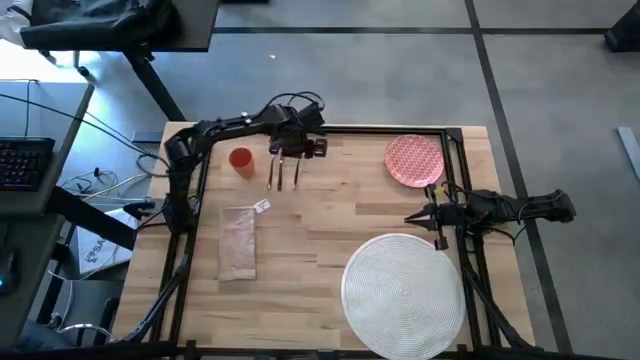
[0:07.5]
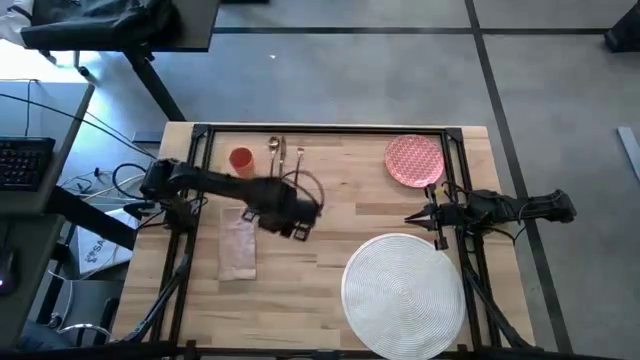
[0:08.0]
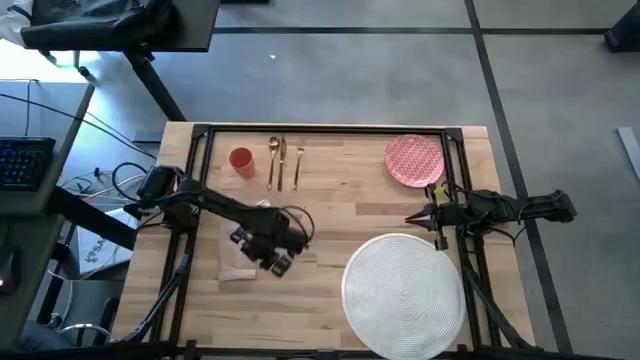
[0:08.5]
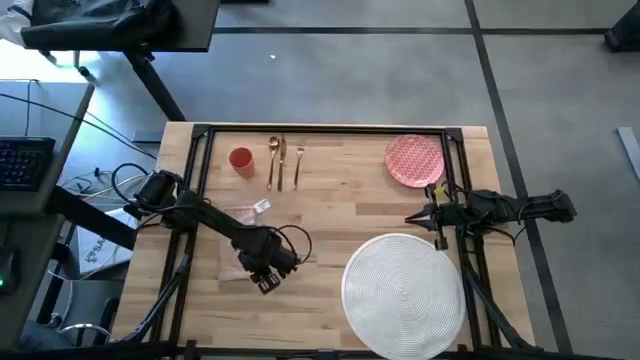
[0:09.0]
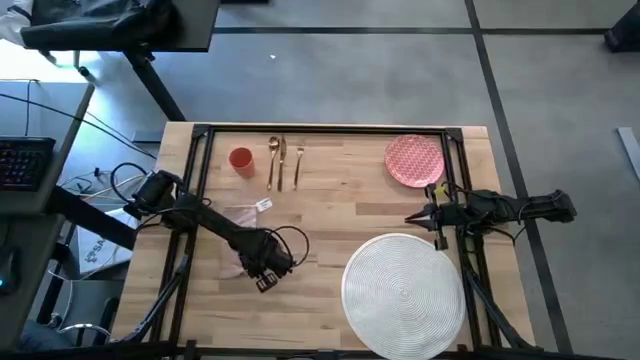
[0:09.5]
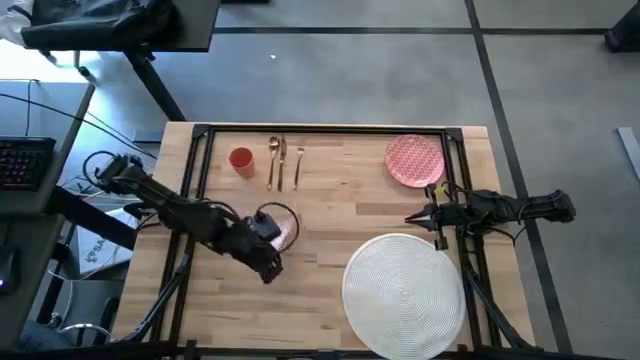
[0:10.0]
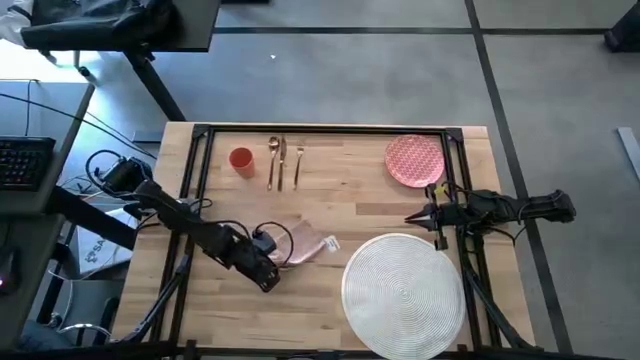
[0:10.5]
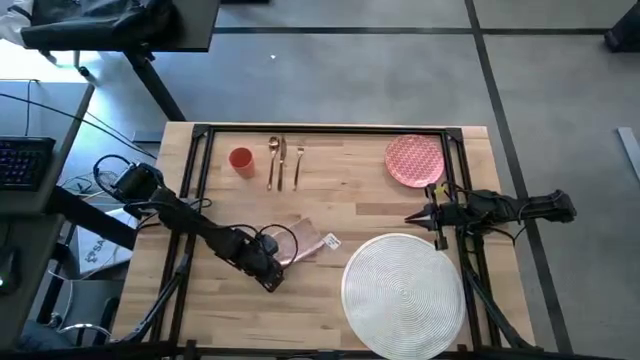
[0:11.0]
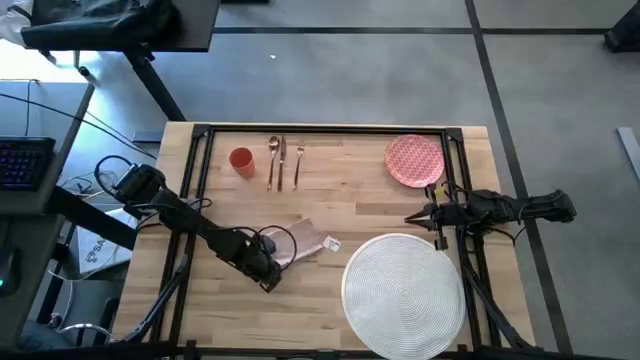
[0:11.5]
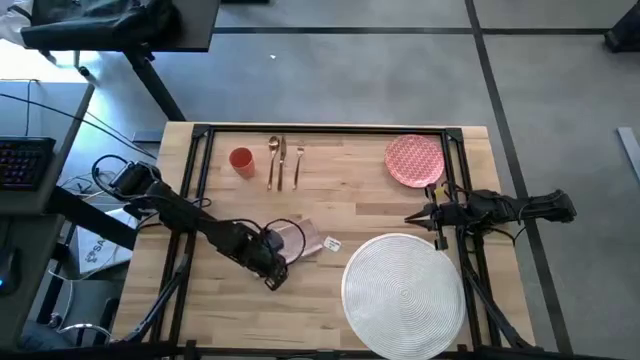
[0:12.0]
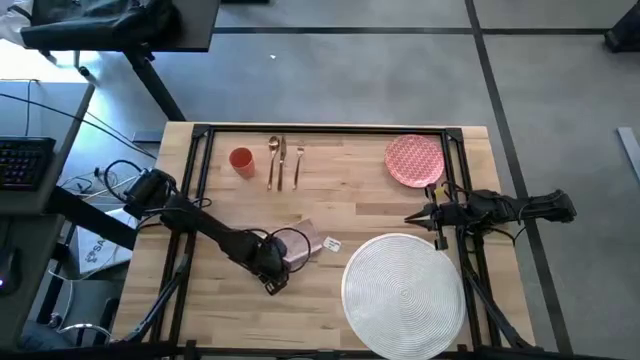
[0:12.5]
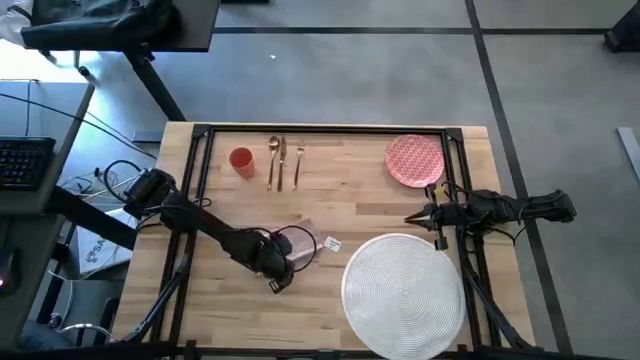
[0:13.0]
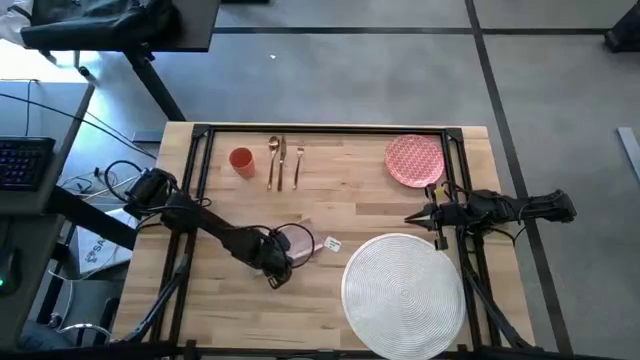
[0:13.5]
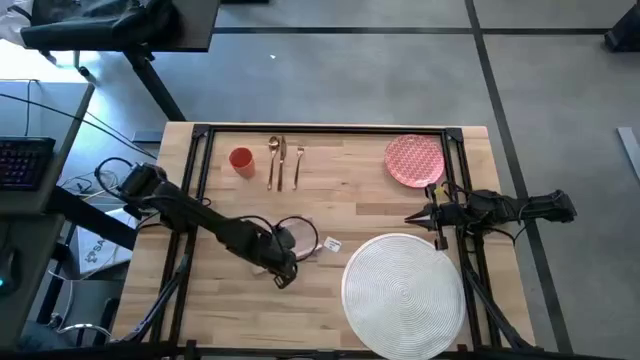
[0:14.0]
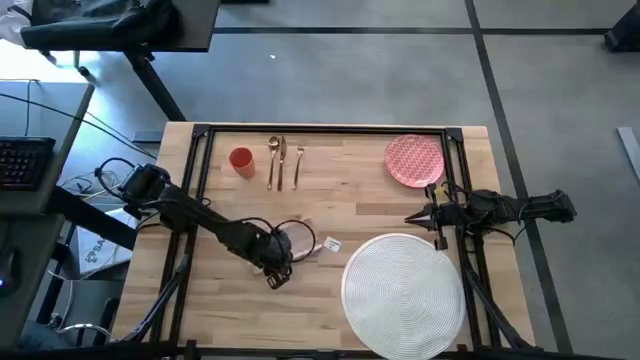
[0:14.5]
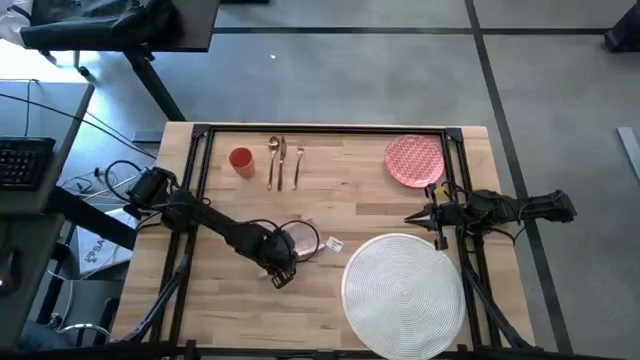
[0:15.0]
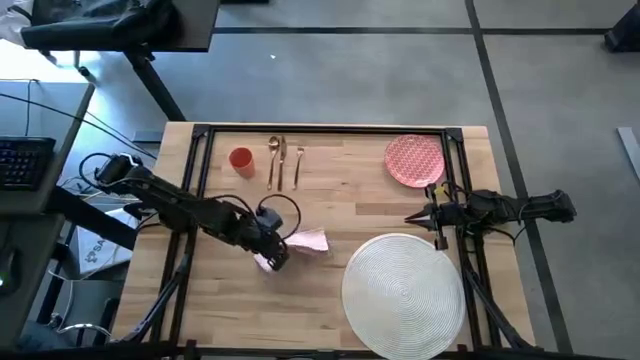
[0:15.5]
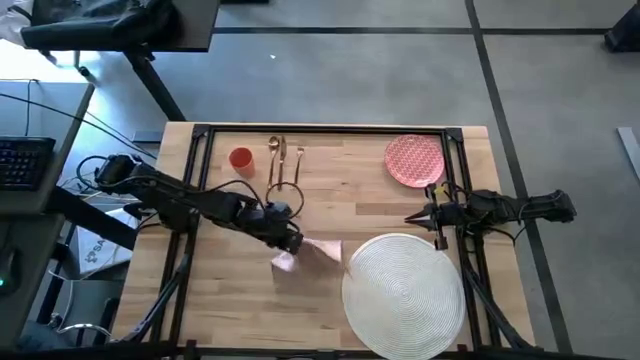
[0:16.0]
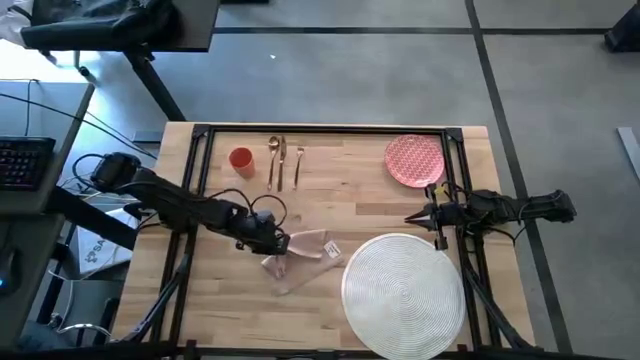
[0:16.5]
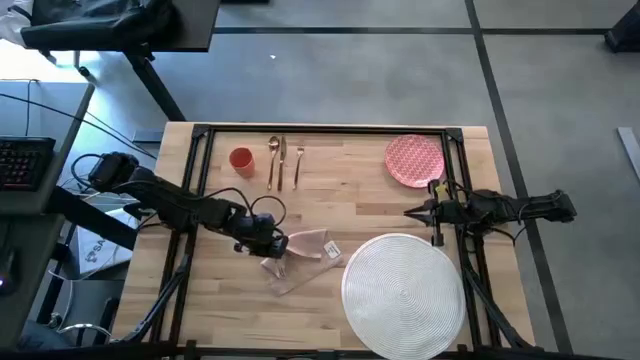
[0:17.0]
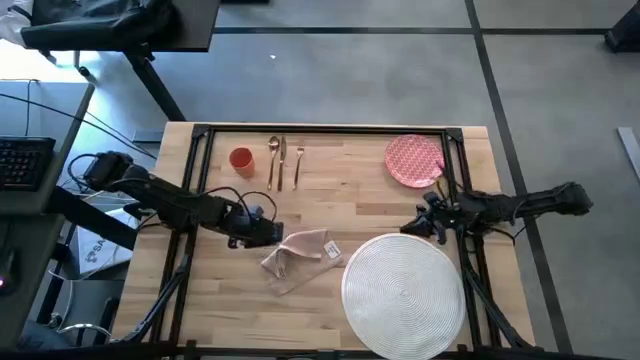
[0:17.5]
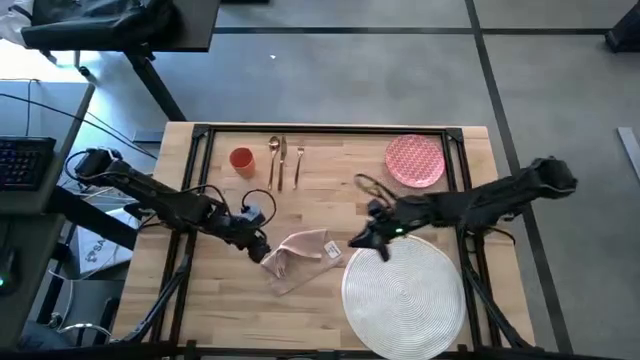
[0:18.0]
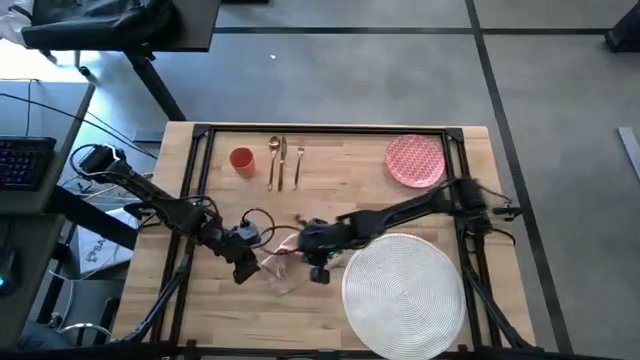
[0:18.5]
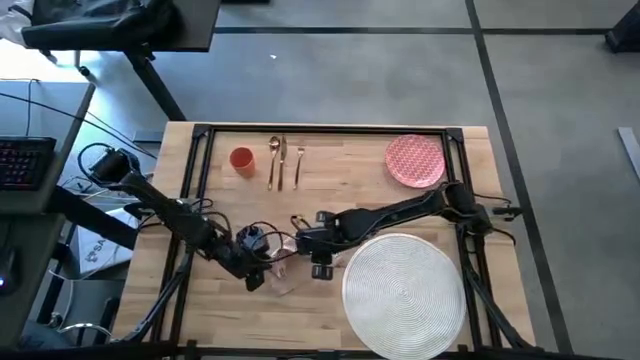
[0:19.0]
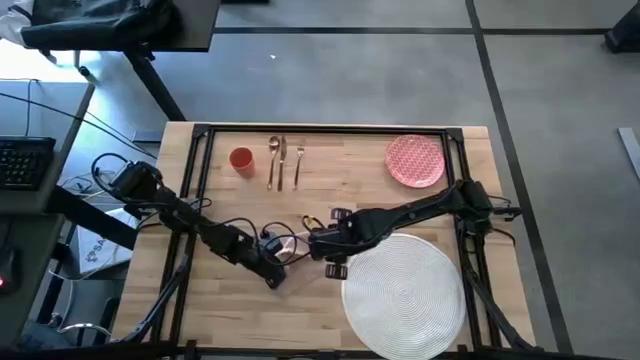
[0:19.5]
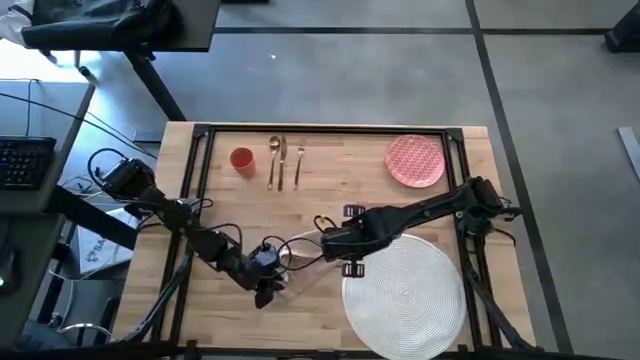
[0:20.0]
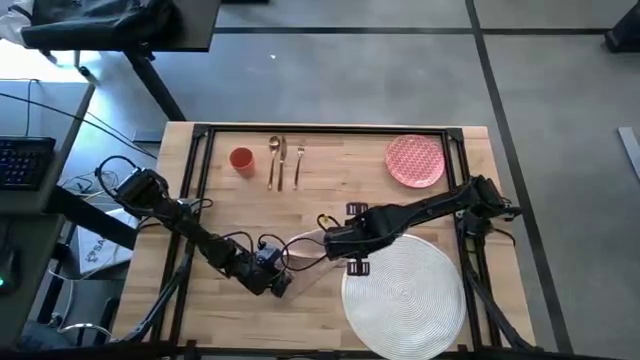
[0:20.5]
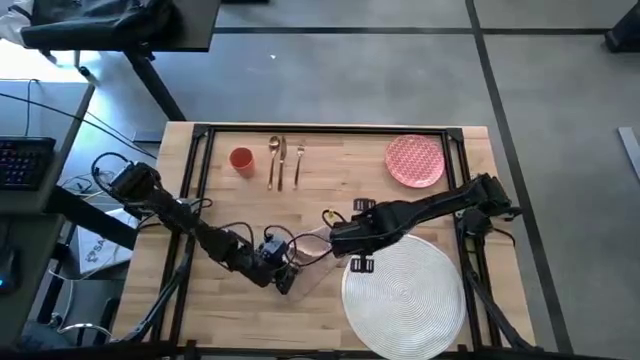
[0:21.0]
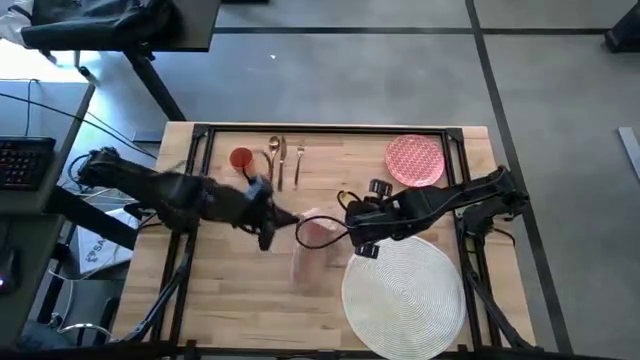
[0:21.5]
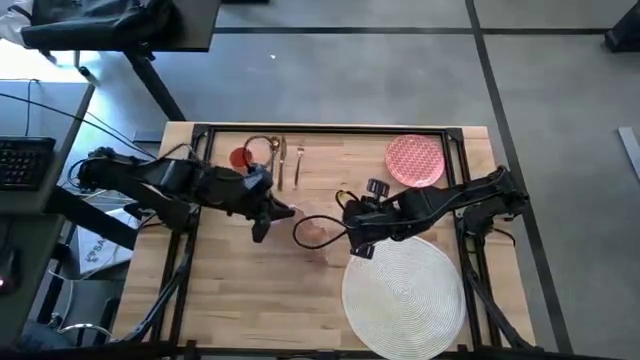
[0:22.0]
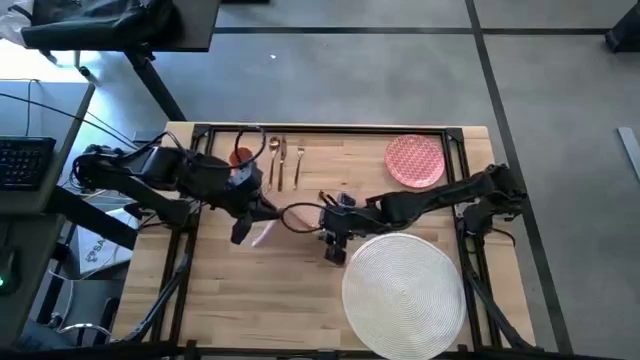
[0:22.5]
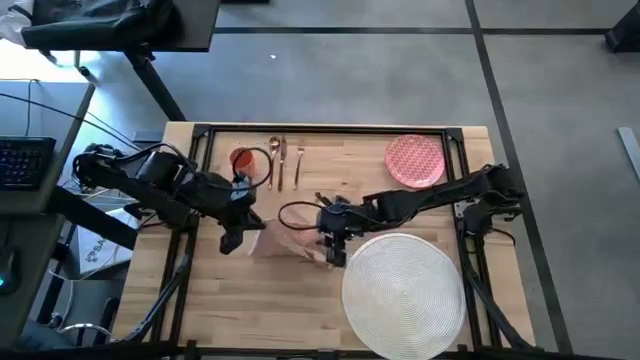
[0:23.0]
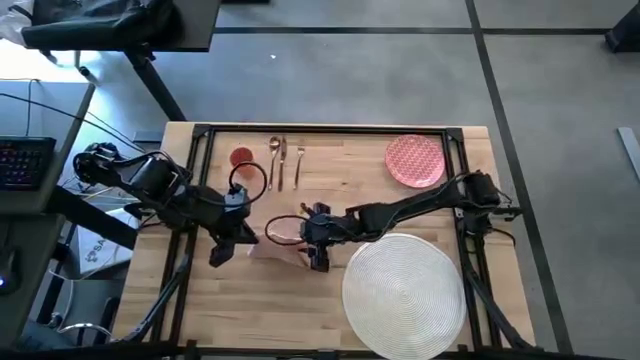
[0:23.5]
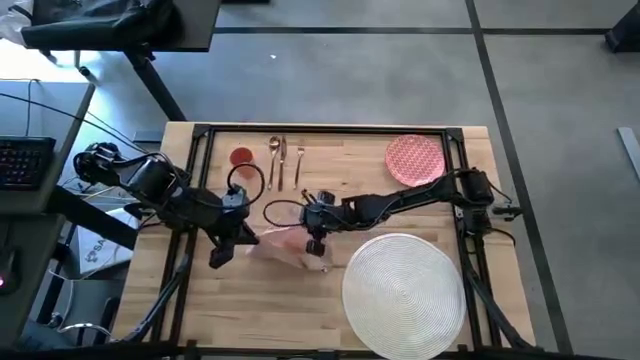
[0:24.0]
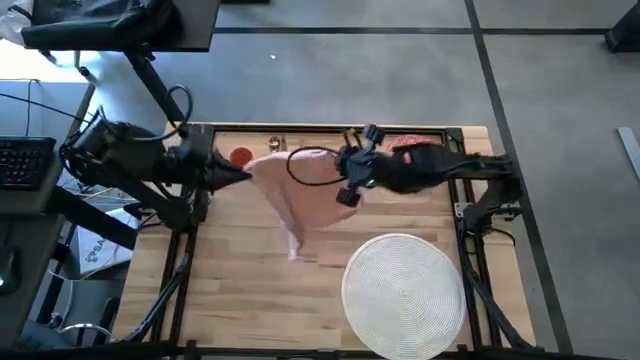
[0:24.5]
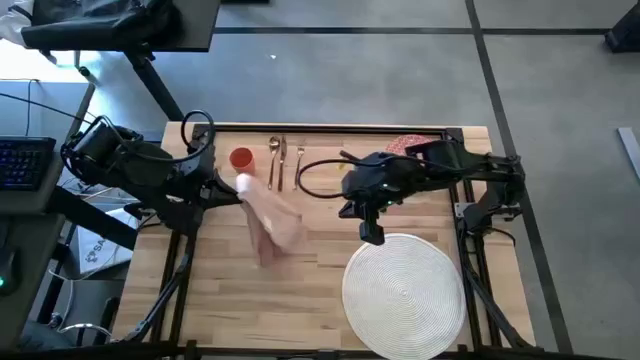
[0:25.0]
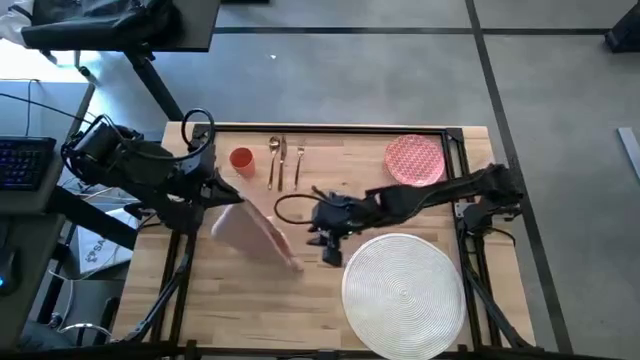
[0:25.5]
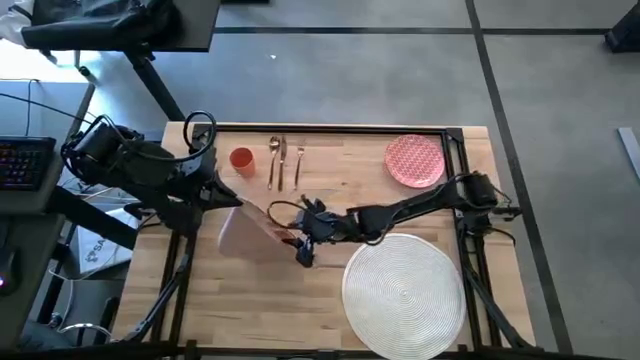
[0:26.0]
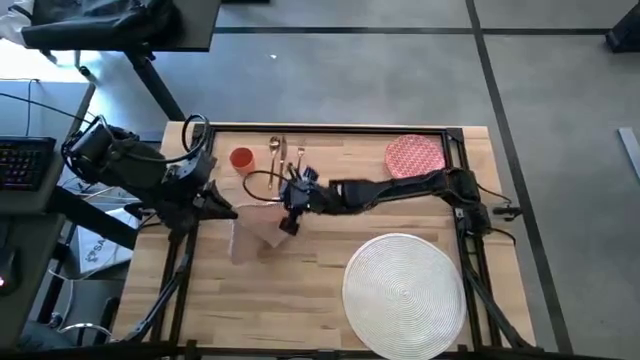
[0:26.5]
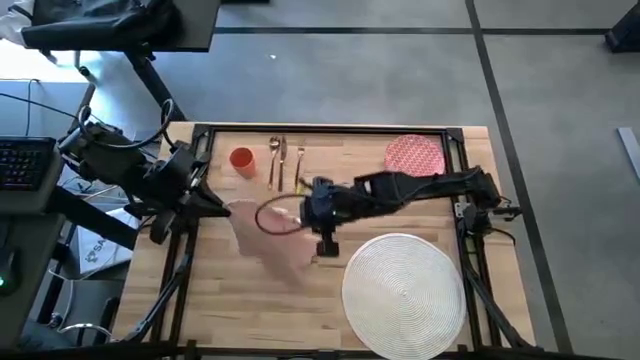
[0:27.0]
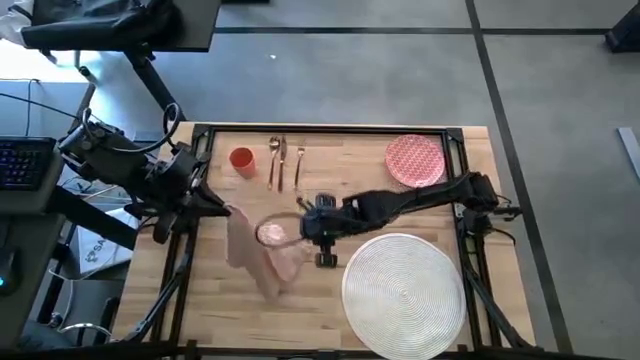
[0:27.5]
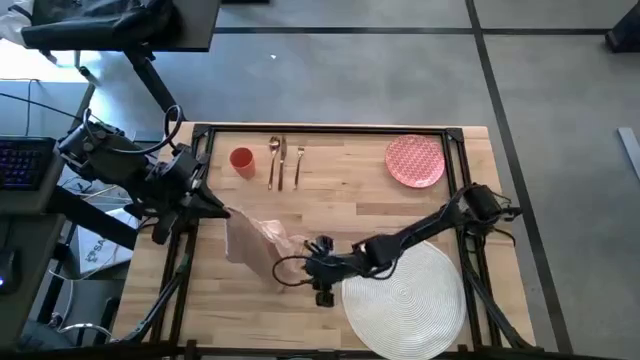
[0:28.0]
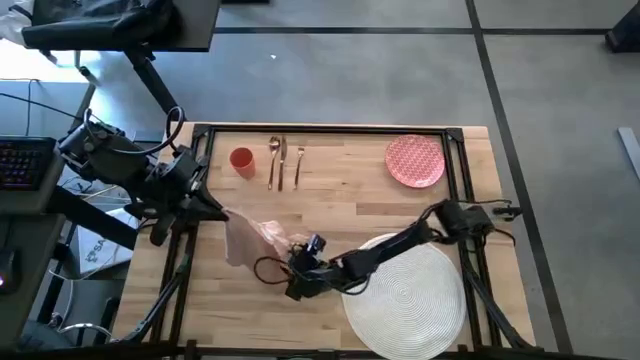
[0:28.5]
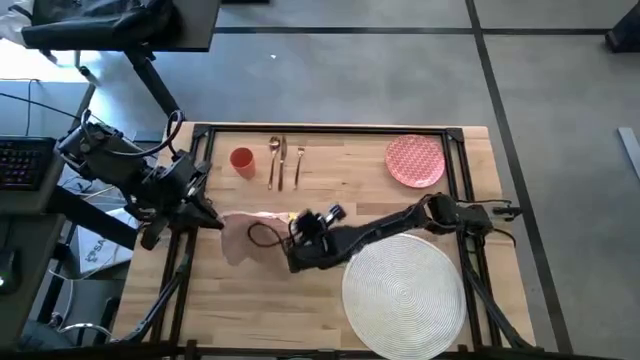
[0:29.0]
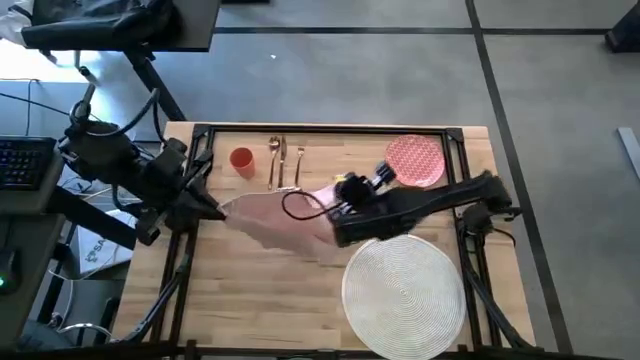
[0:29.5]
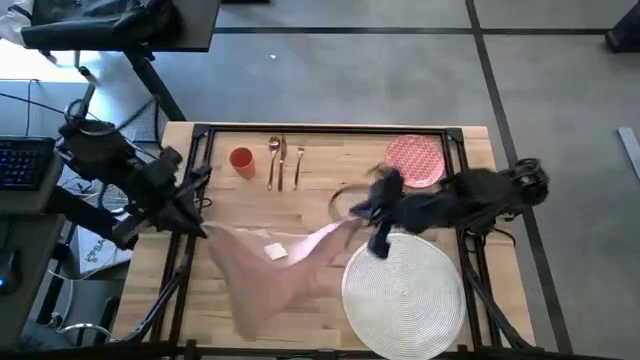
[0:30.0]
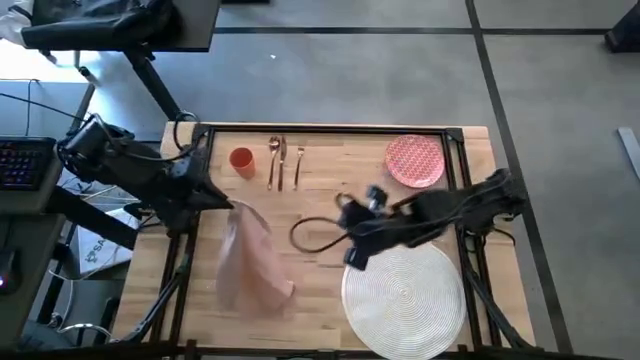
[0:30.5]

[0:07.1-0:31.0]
Task: Set table place
Fold pink table napkin
